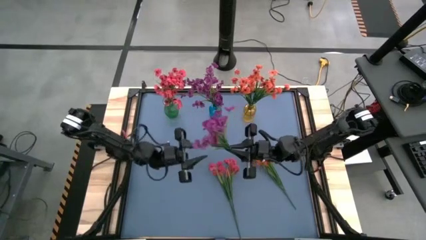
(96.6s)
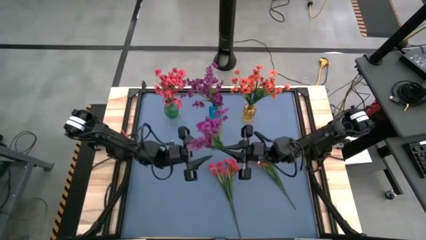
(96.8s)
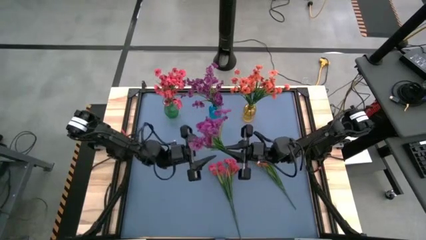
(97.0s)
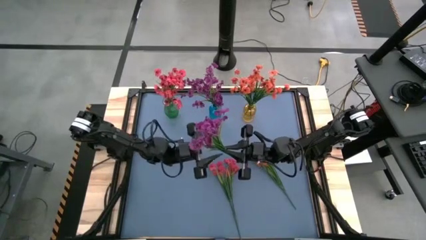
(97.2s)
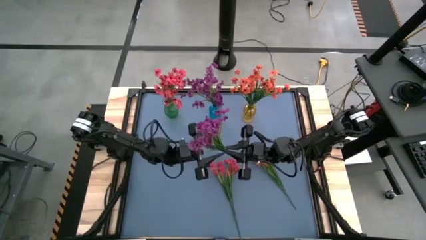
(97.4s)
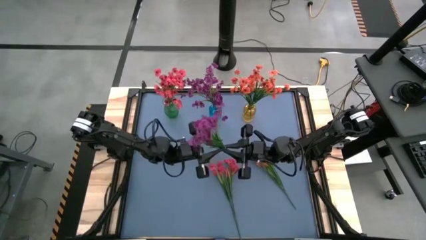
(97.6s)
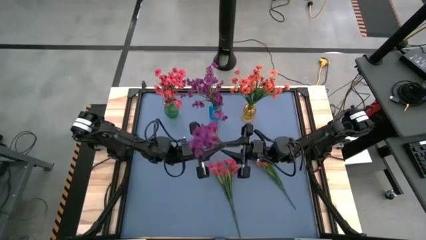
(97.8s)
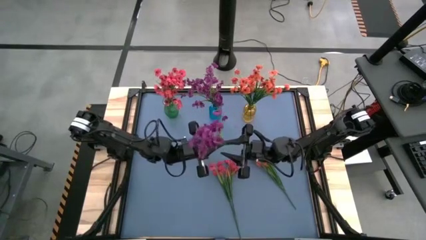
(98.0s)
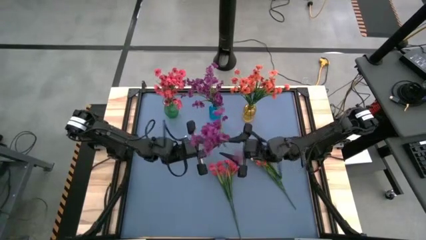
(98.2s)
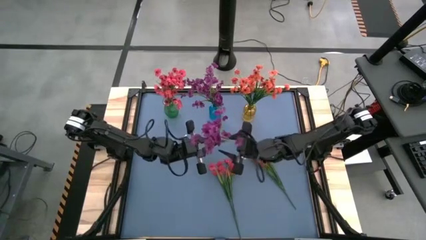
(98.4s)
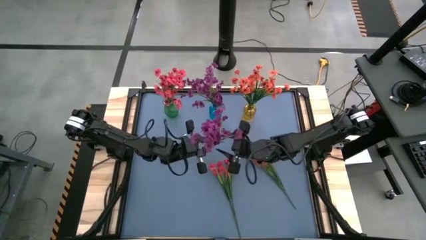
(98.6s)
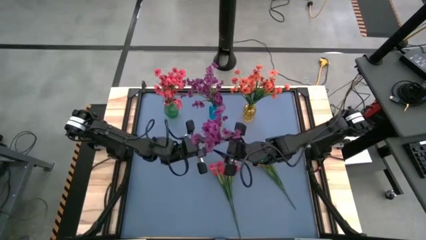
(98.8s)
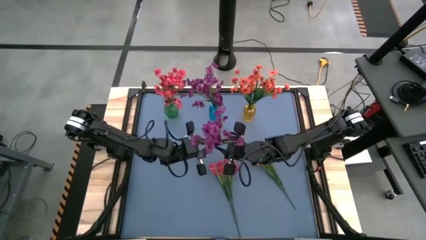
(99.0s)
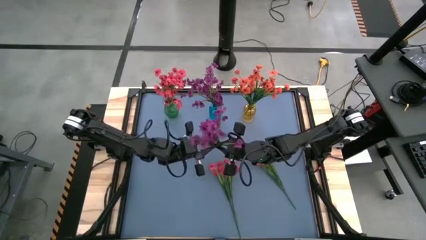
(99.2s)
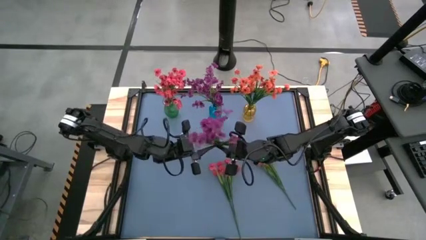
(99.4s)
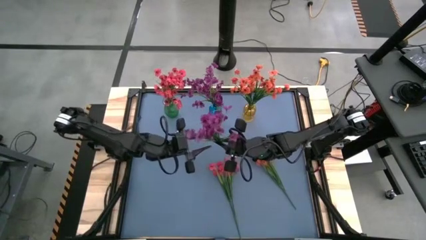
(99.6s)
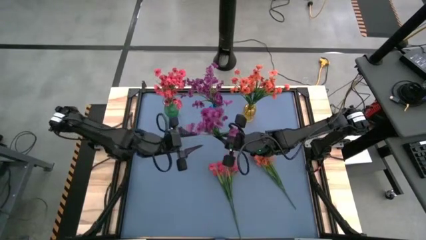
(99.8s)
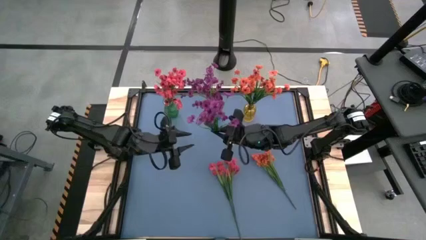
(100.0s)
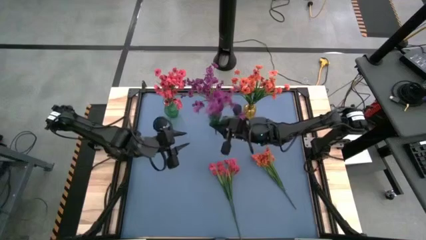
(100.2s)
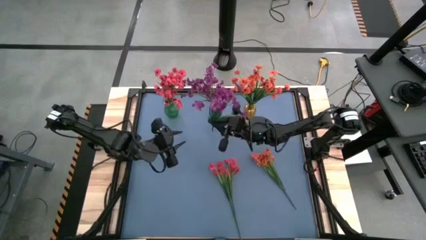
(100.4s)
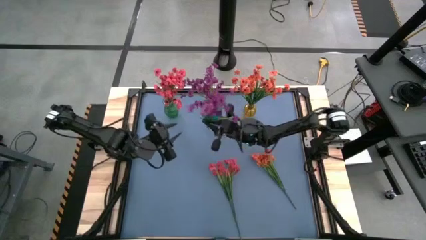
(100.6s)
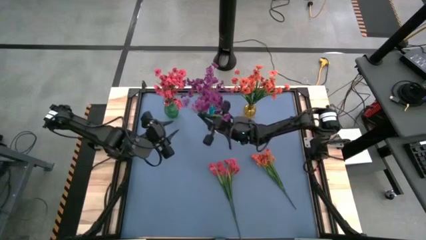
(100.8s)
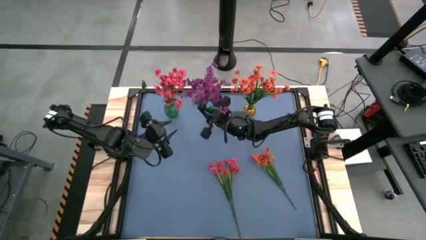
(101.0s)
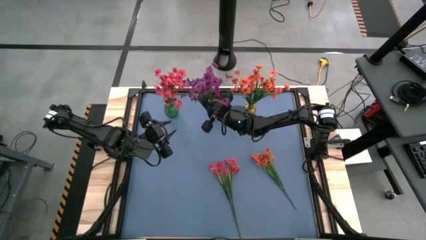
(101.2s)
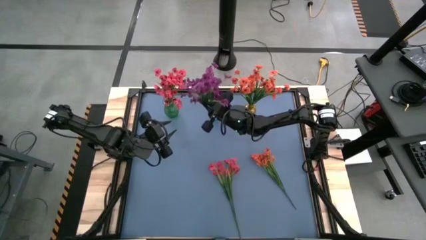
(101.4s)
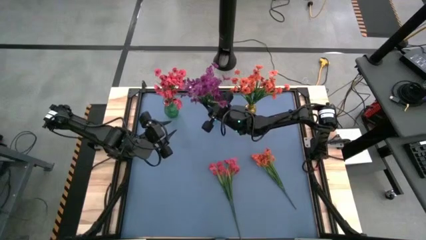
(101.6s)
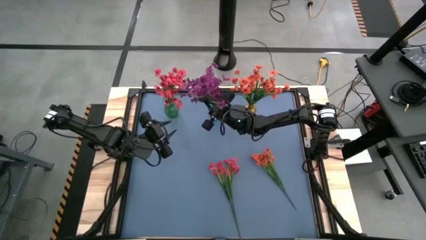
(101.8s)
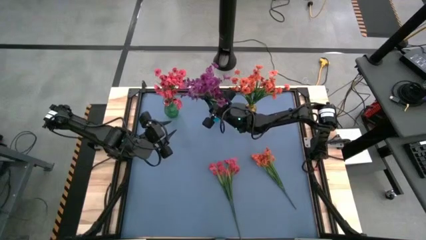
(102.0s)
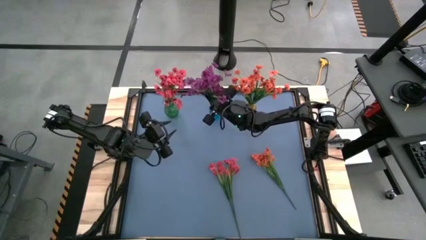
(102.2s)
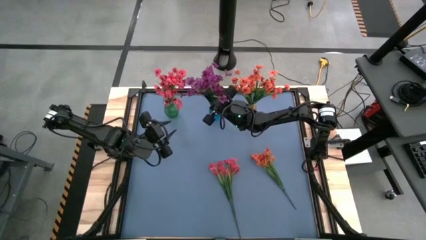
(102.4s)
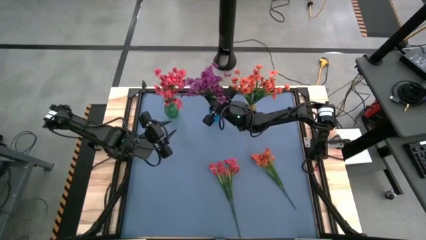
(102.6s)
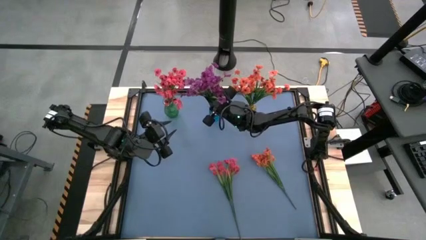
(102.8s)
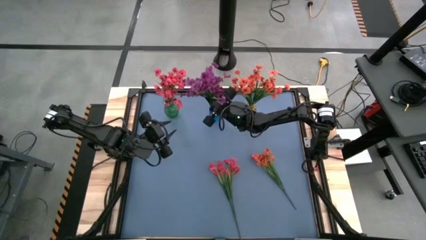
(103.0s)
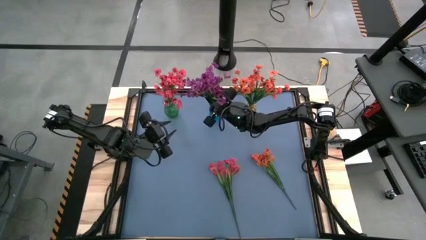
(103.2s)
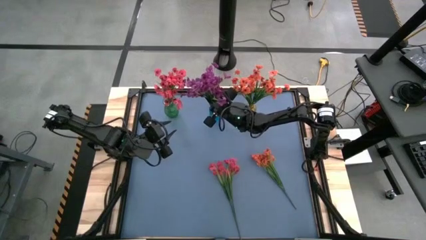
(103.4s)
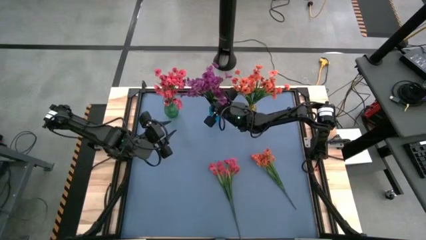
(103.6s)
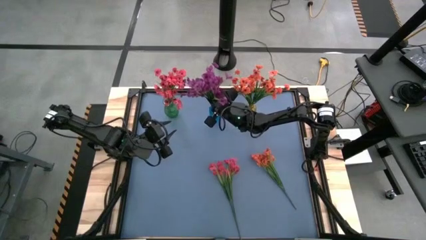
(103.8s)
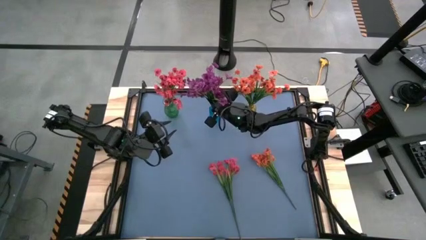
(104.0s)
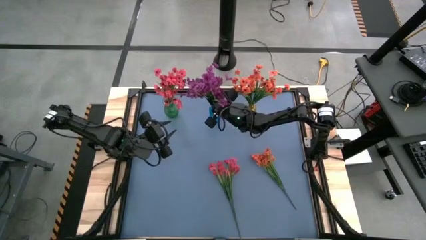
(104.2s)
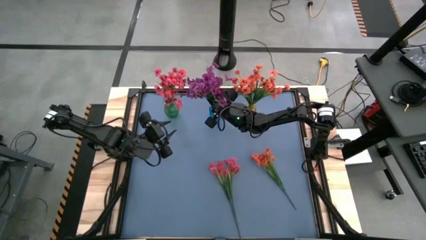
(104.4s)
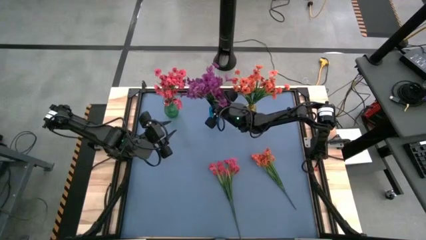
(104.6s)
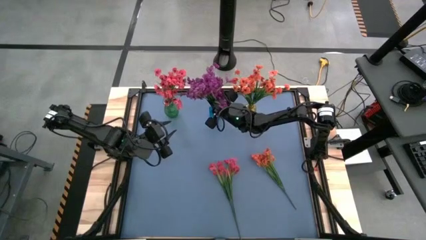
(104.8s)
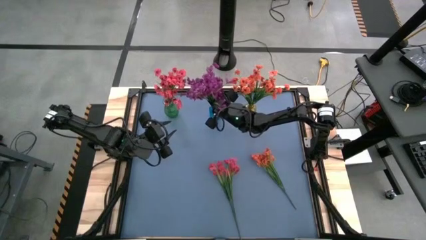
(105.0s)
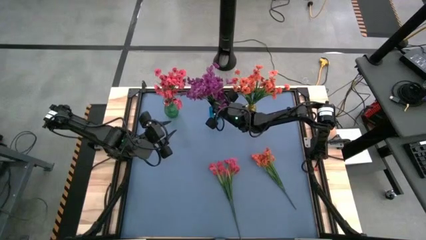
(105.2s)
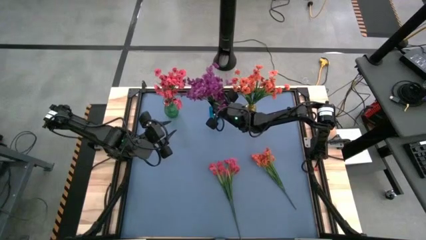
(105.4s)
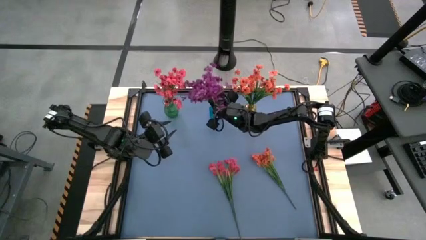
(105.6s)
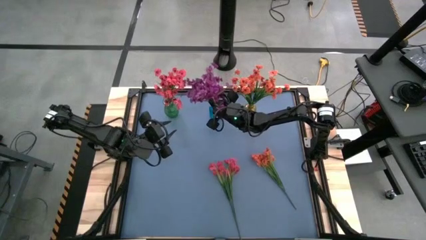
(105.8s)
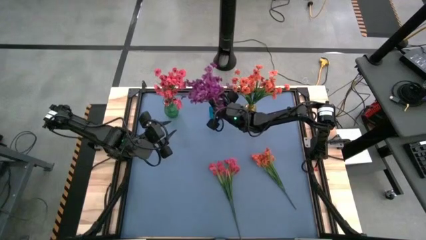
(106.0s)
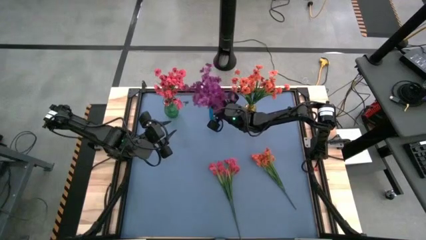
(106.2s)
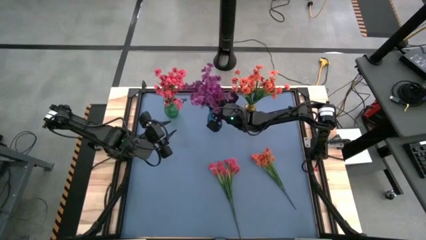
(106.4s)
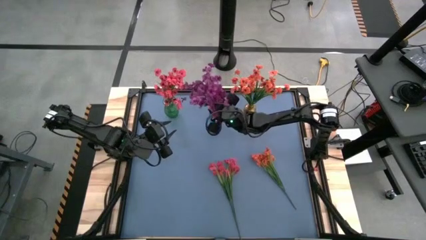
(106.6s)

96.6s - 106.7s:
Task: Sort flowers into vase by color
Put the violet flower into the blue vase

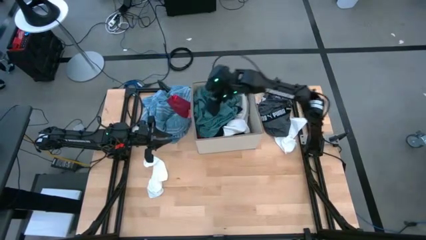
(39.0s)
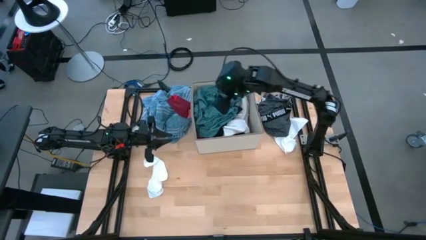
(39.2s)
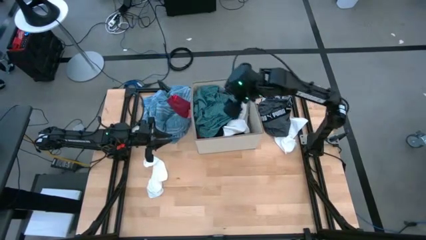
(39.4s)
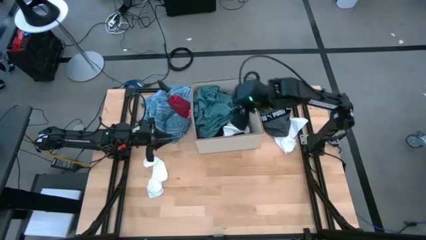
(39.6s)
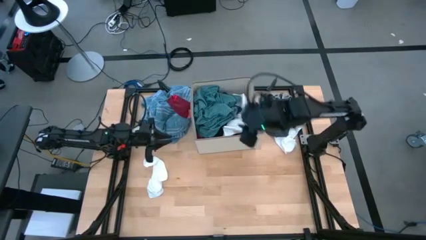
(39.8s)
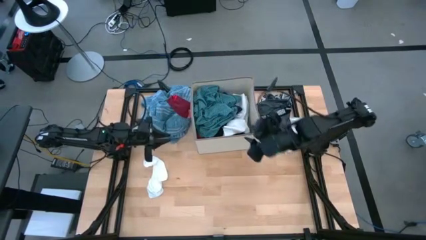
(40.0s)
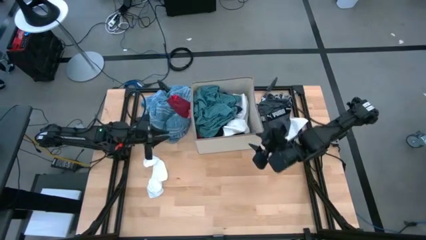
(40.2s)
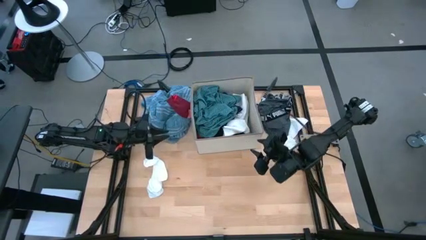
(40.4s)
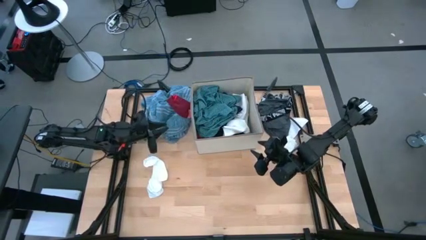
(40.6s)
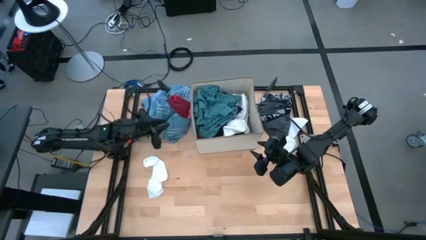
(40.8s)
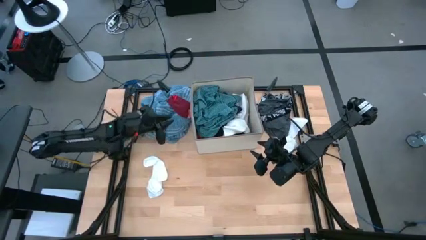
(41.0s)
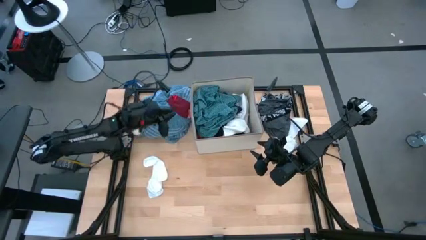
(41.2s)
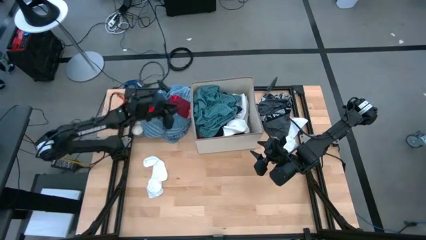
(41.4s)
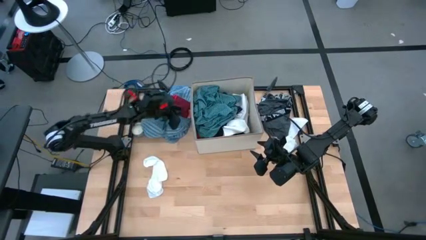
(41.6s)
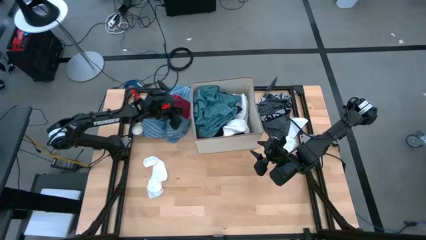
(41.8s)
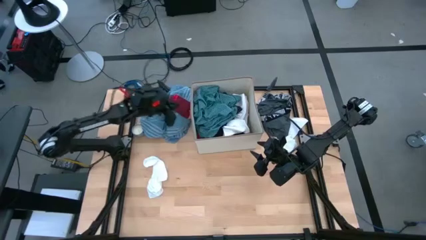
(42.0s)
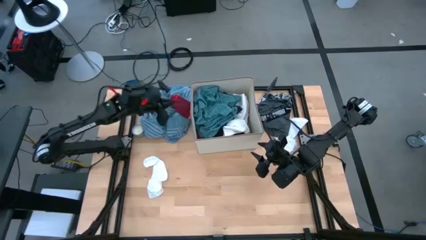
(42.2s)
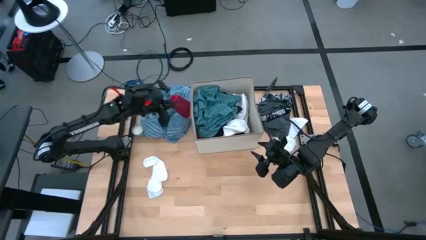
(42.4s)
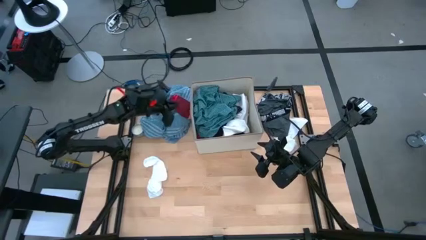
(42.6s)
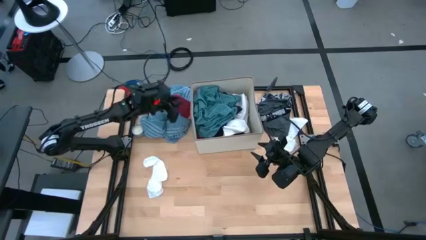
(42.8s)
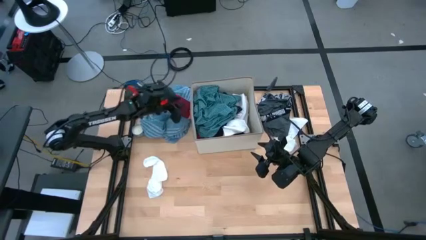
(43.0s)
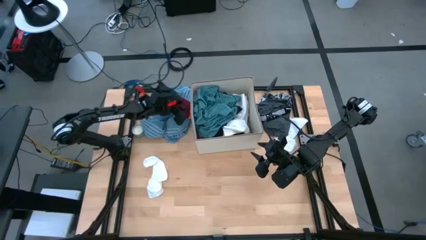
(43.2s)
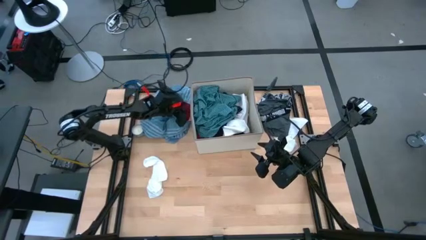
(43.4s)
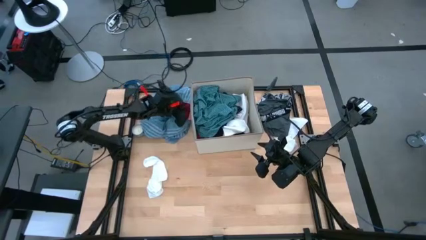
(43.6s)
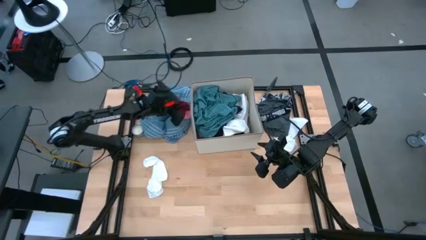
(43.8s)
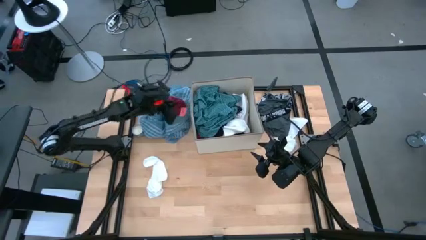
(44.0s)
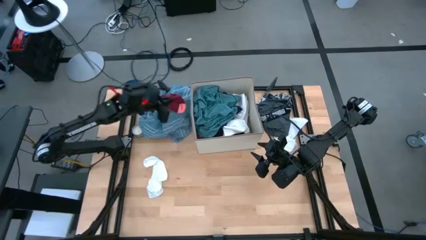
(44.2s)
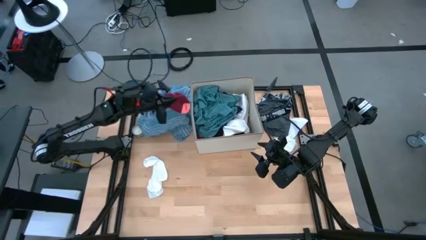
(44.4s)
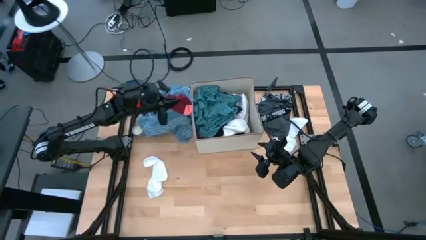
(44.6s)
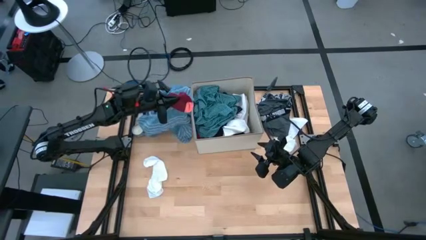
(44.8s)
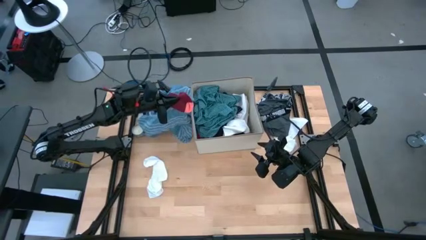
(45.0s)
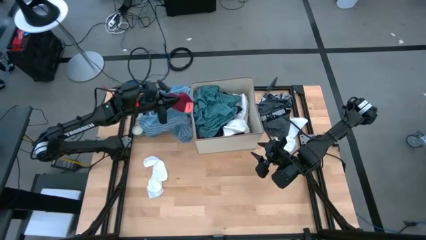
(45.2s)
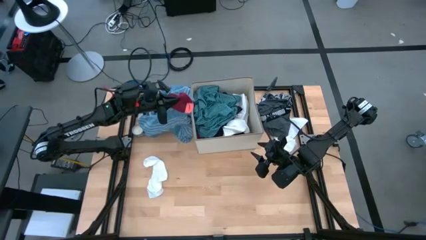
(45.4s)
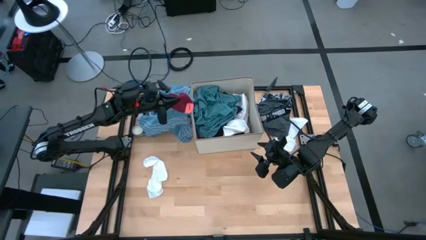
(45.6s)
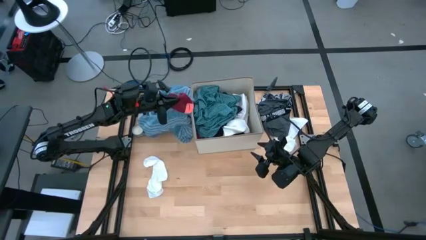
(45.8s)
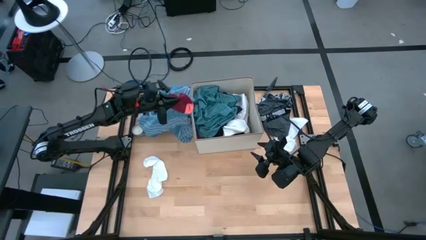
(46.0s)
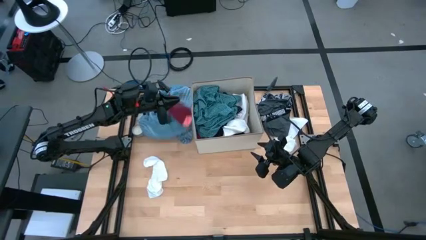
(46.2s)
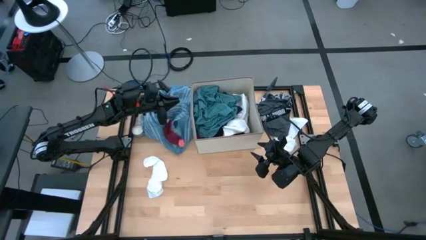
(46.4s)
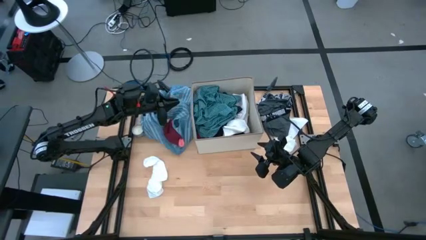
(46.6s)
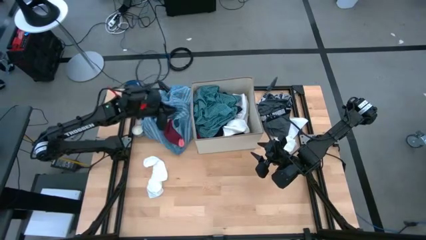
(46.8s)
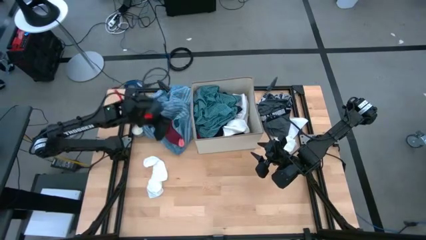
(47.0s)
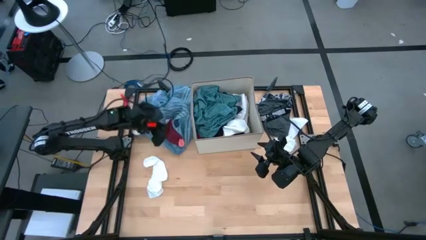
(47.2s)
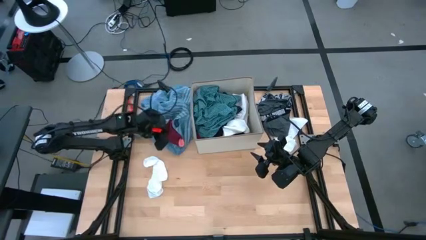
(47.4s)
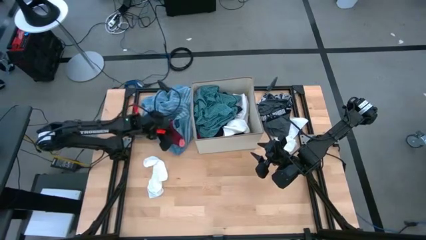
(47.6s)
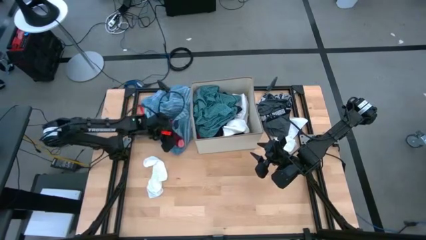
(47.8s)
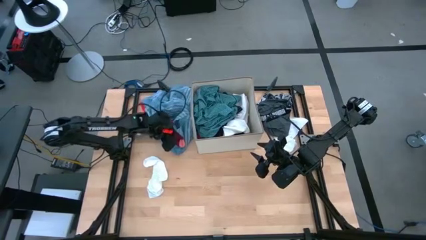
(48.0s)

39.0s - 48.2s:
Task: Sort clothes
Put the red sock into the bin
